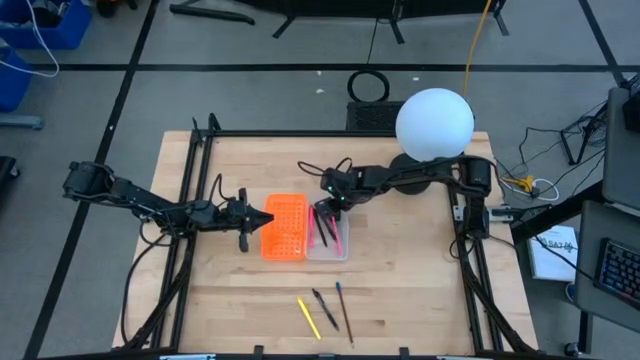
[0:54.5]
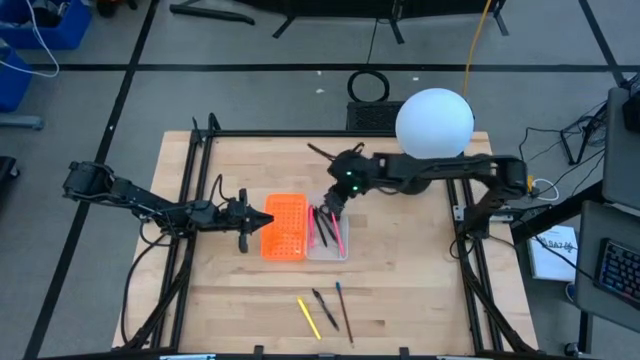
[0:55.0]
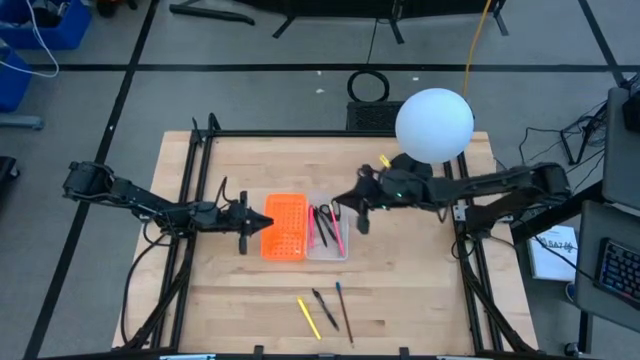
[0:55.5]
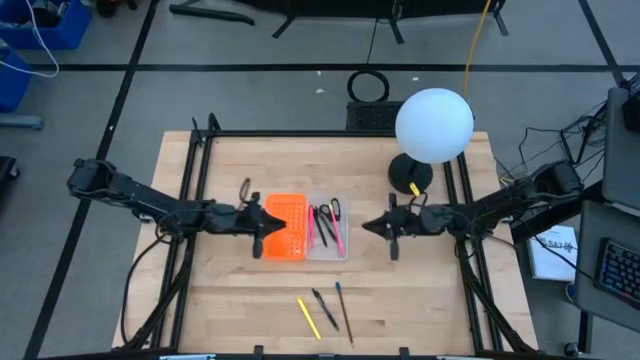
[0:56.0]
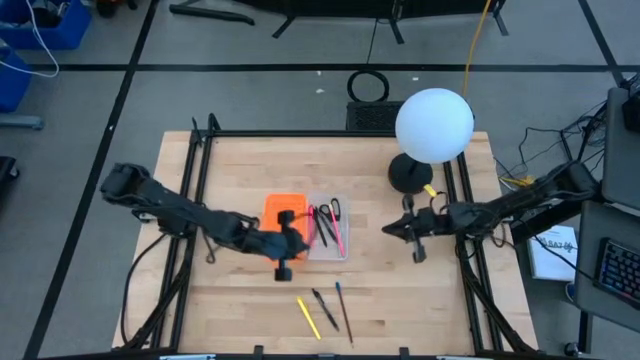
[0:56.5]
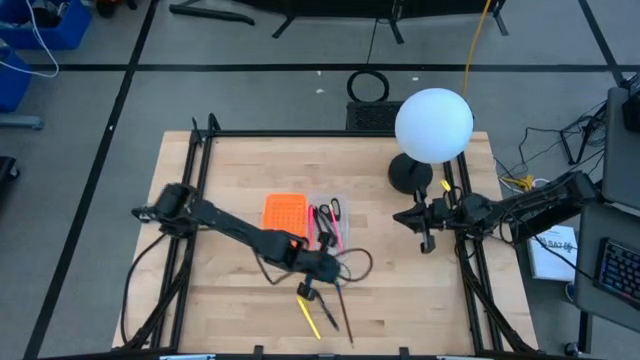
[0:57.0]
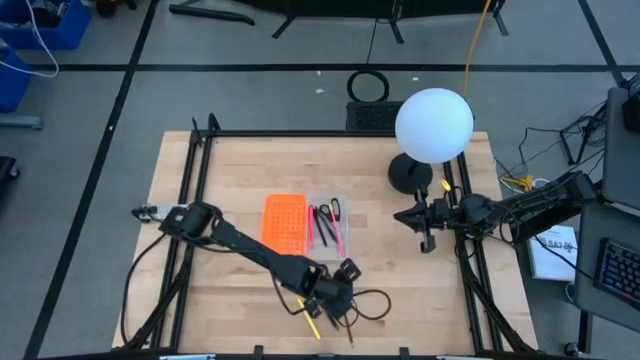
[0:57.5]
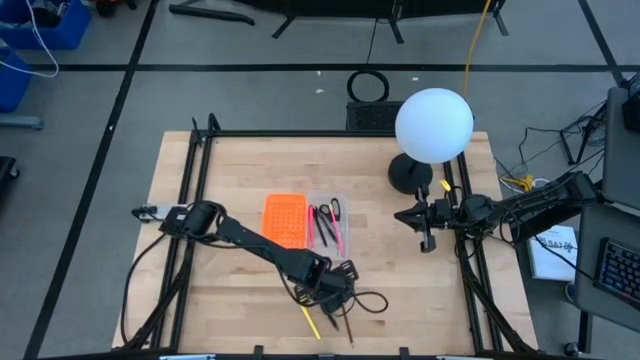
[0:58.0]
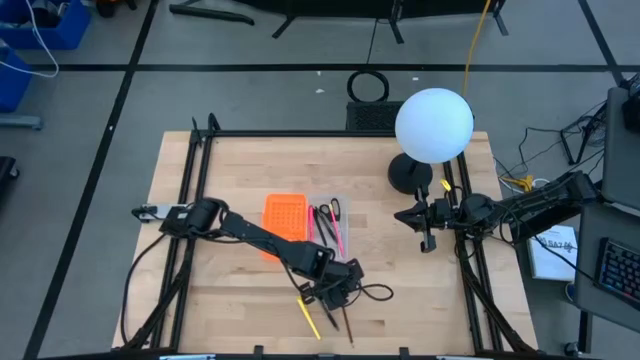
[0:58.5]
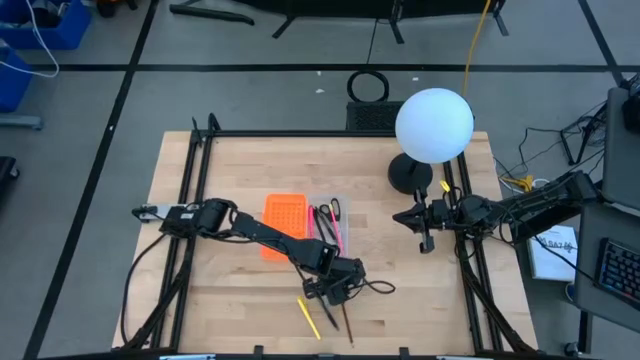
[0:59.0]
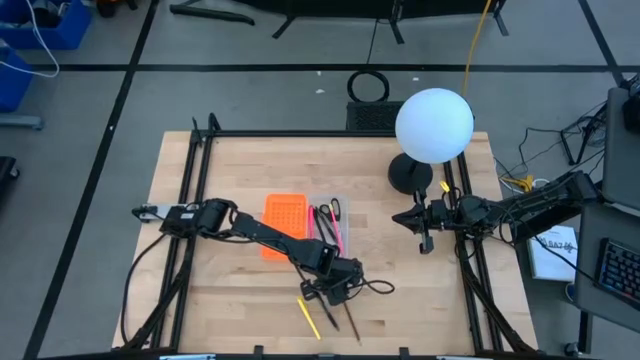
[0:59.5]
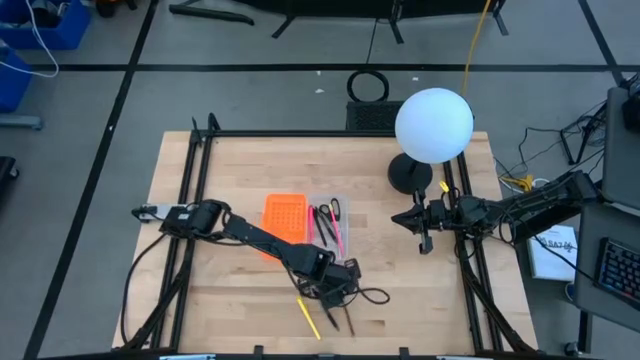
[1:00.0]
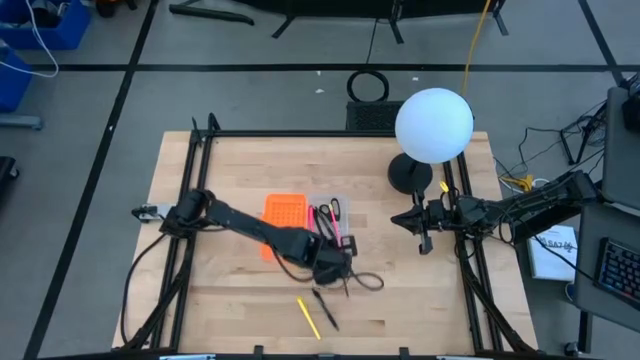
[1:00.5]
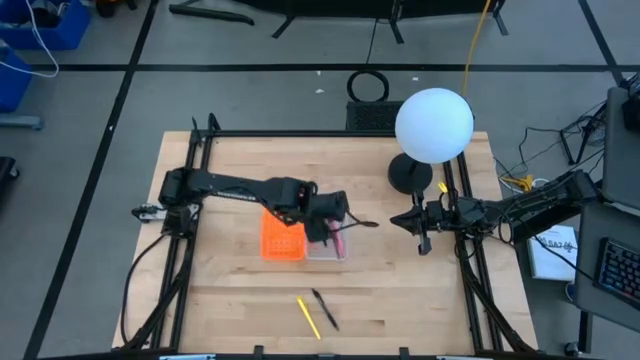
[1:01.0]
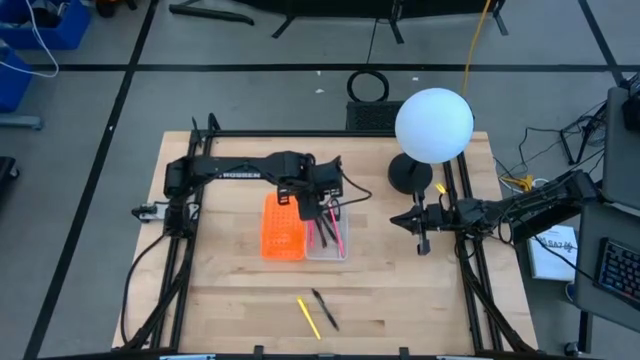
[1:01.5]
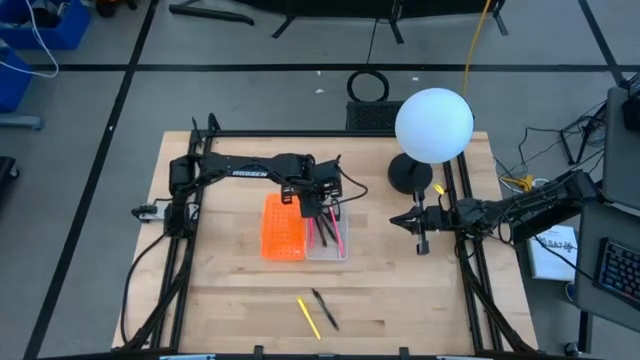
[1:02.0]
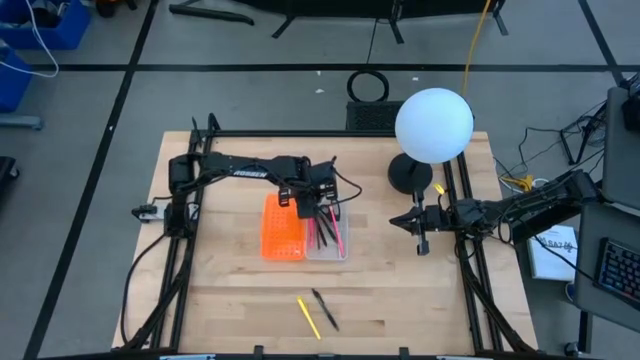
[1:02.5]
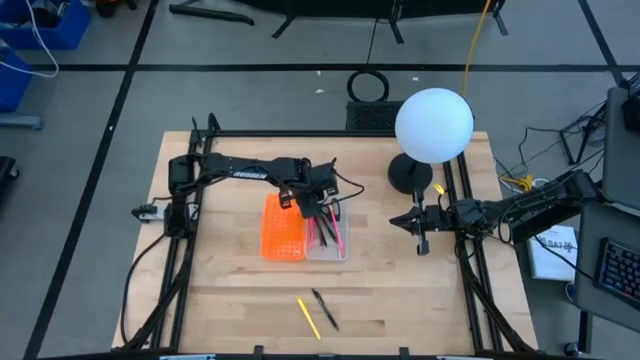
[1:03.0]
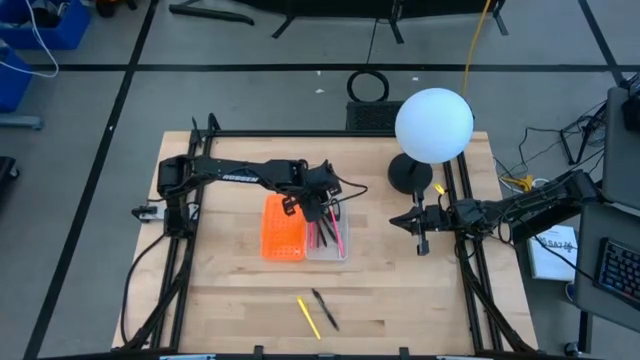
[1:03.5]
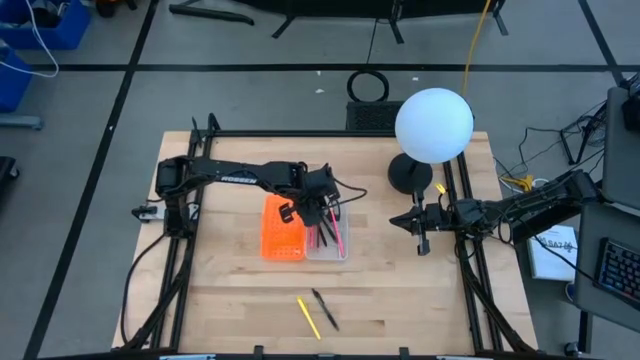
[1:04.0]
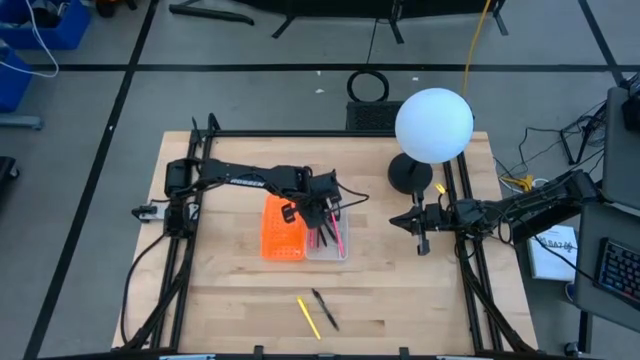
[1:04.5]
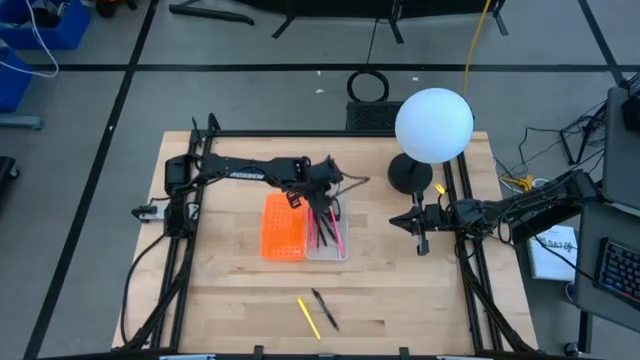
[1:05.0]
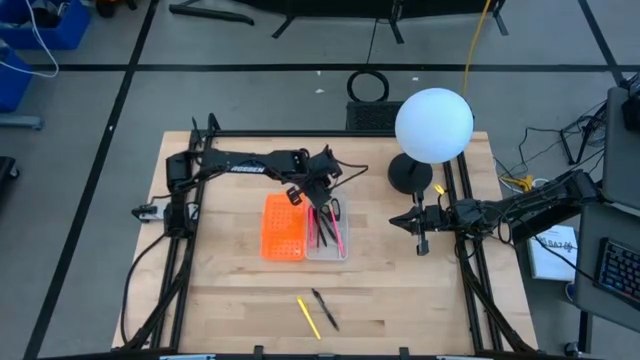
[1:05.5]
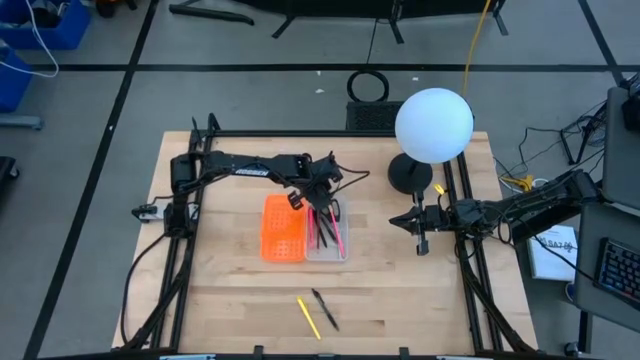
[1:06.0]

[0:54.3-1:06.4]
Task: Pick & place school supplies into a supply box
Put the brown pencil into the transparent supply box

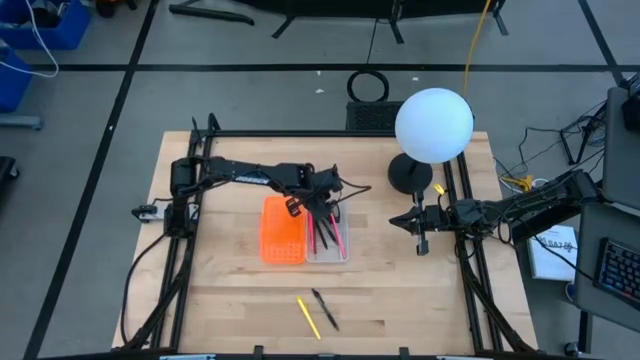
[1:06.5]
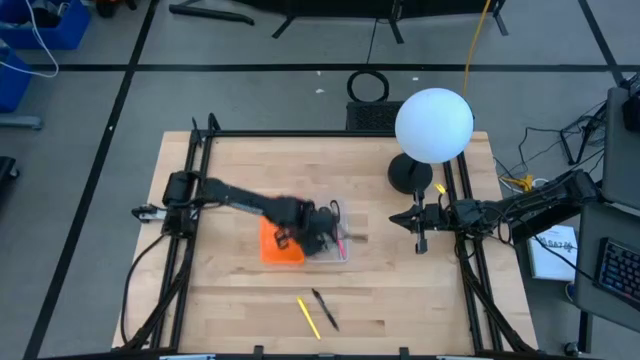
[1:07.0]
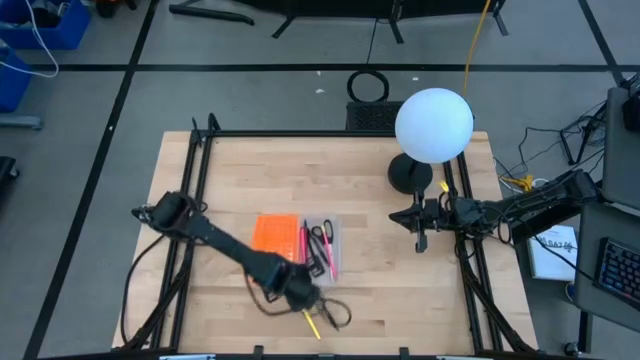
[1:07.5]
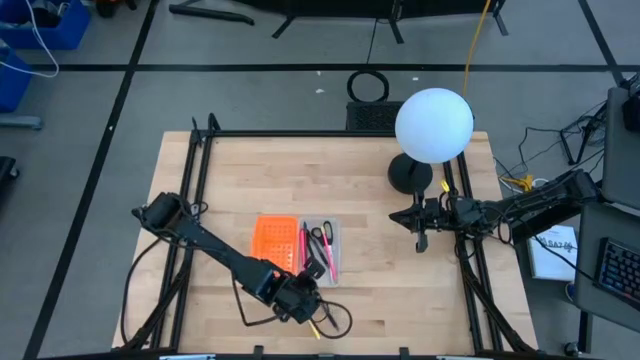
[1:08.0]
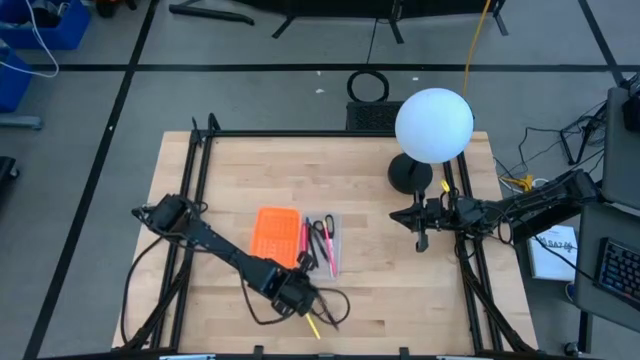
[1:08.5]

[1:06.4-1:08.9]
Adjust the transparent supply box

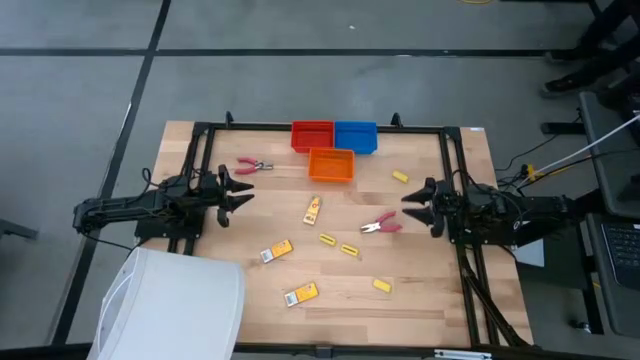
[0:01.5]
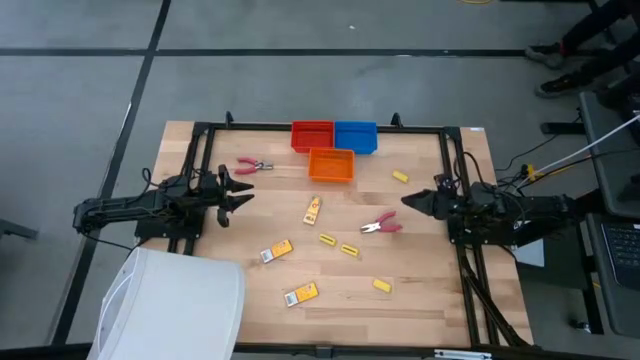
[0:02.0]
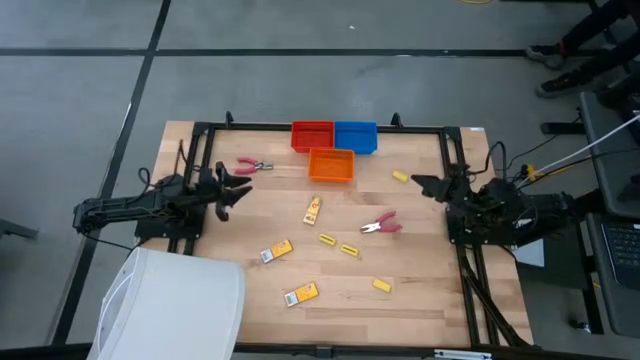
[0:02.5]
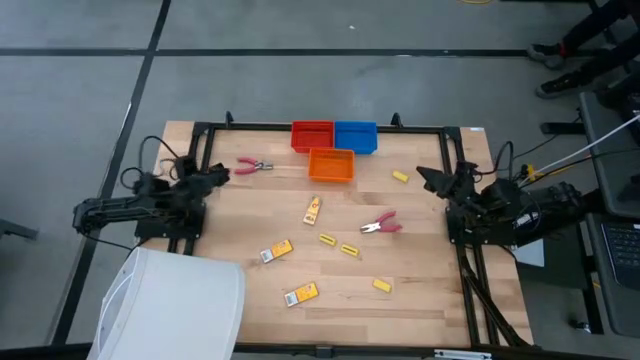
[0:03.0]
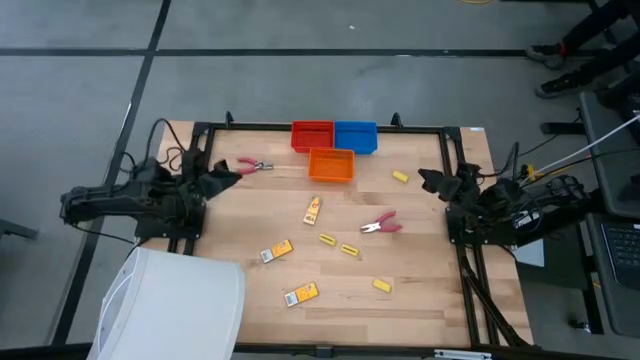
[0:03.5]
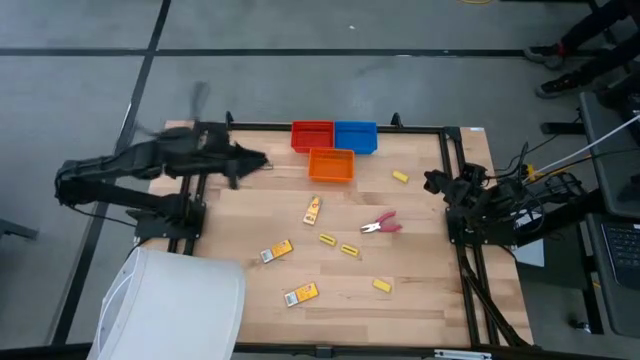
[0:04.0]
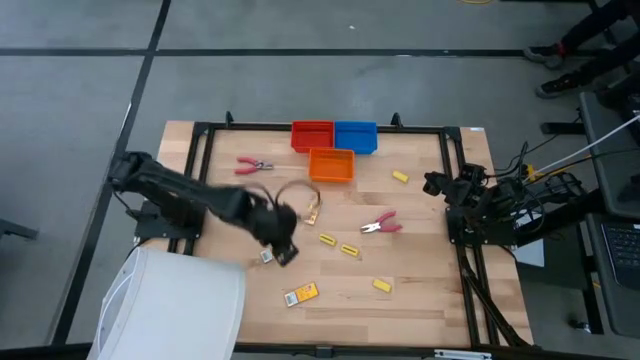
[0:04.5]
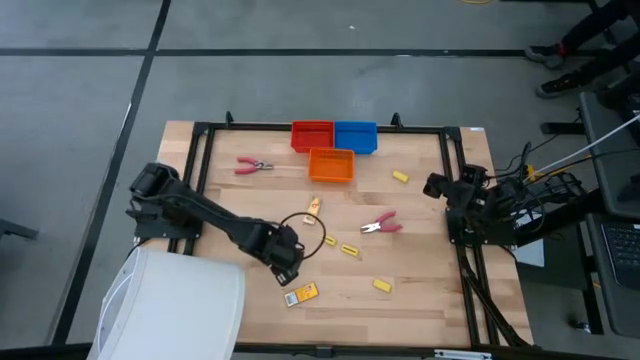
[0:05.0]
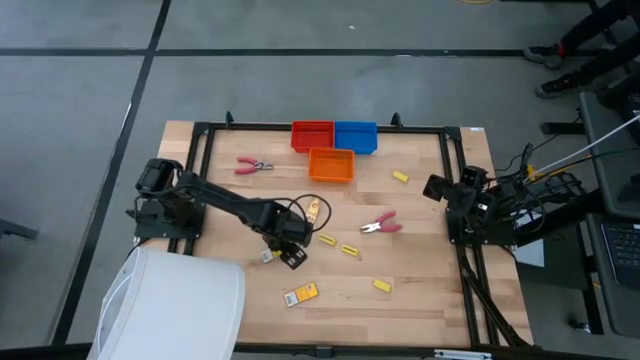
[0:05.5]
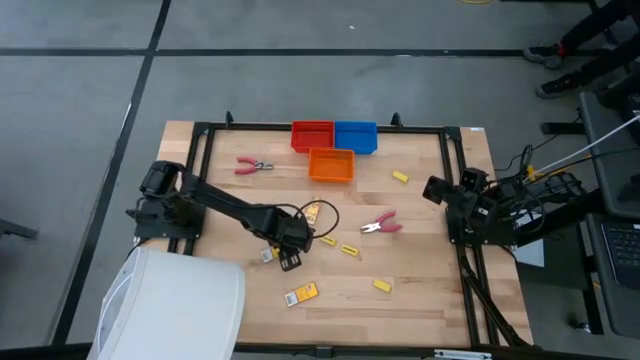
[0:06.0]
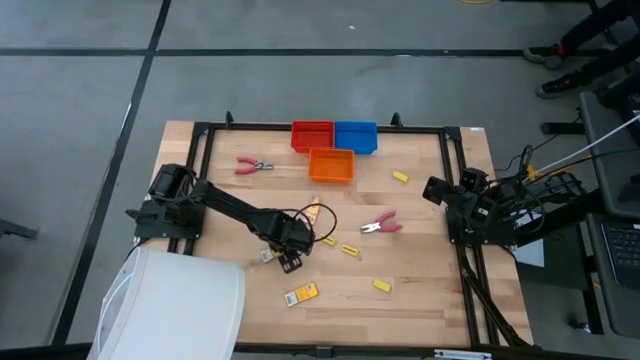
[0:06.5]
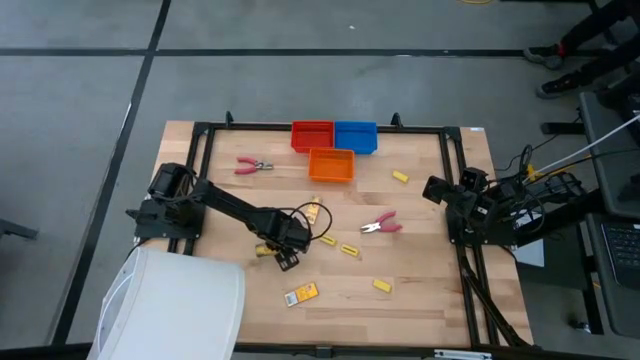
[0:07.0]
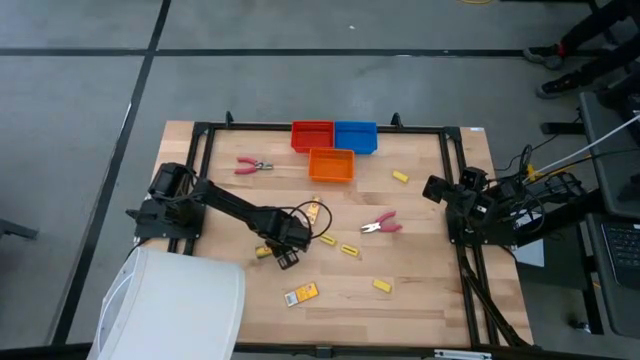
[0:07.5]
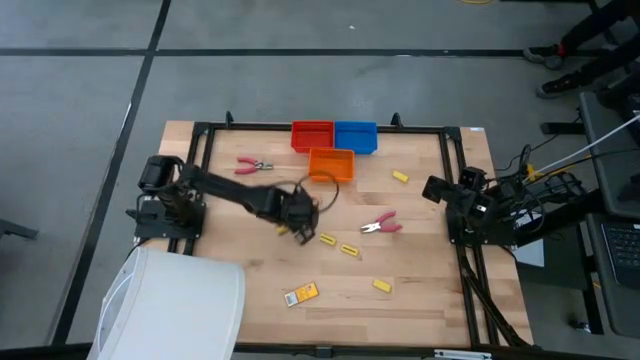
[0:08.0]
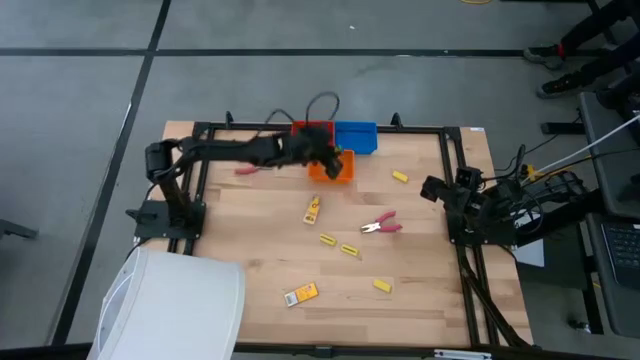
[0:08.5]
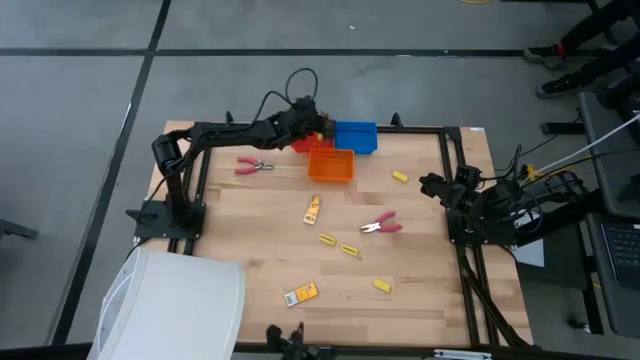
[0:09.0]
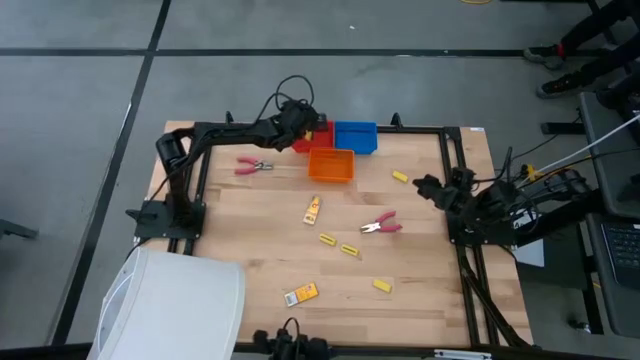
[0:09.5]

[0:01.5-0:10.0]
Task: Pick & Place School Supplies
Put the yellow crayon box into the red bin
